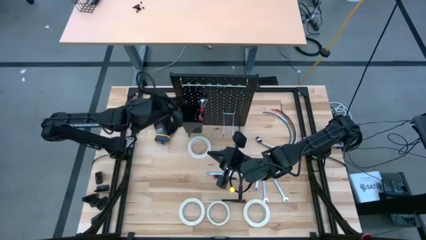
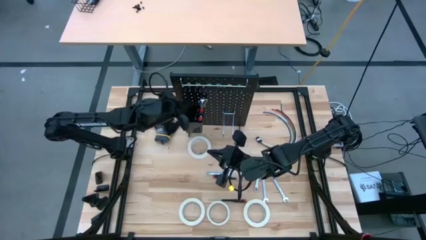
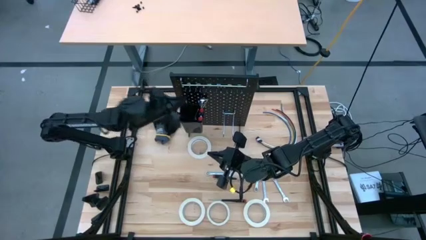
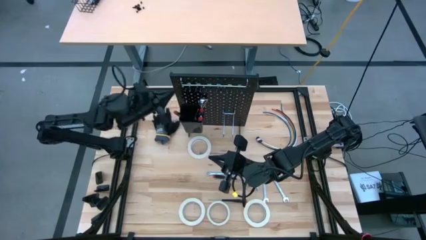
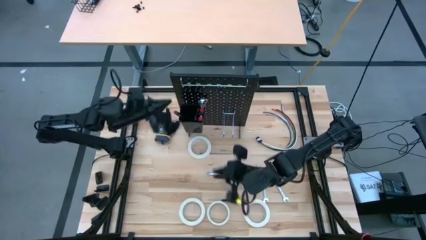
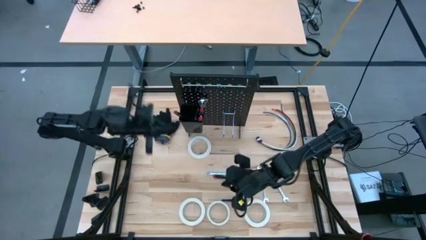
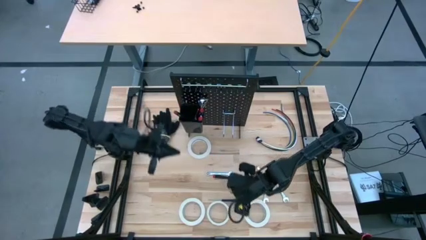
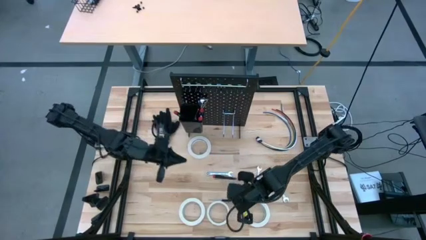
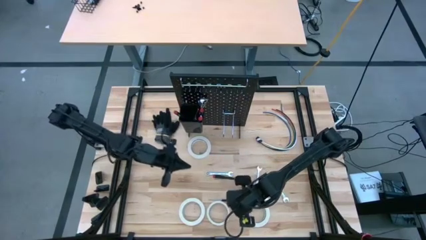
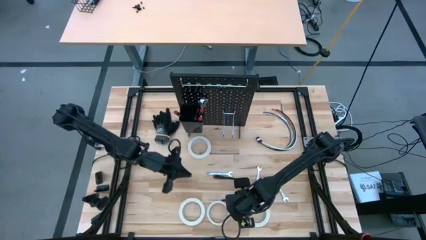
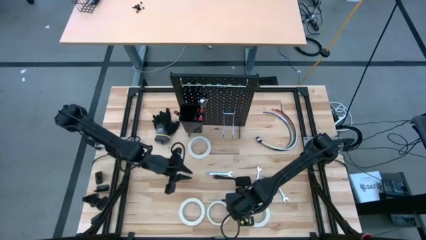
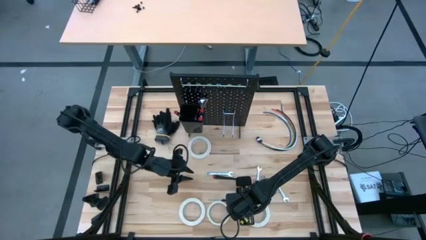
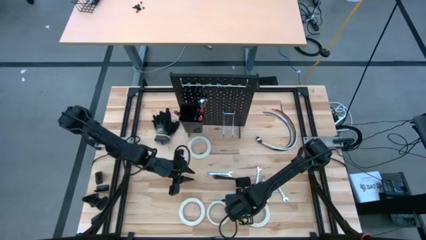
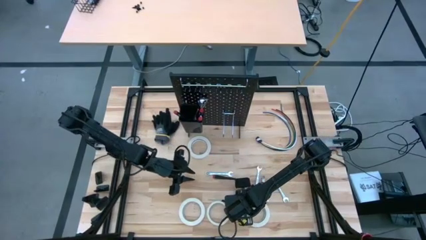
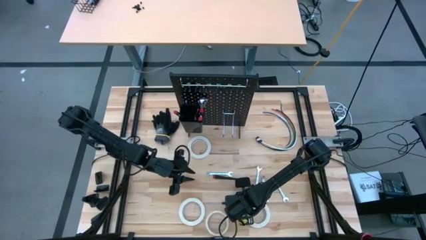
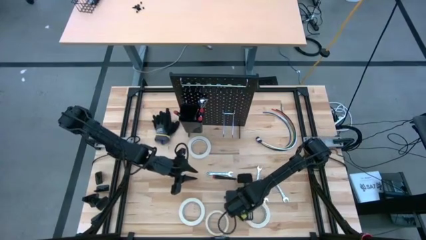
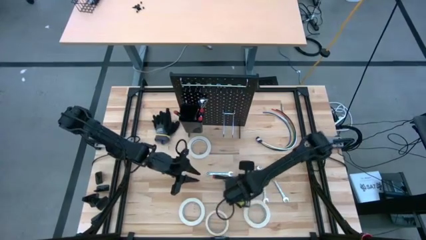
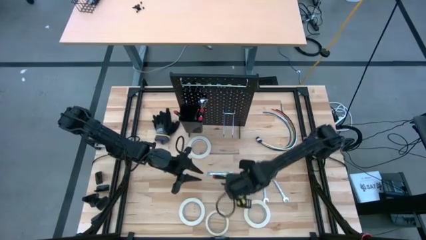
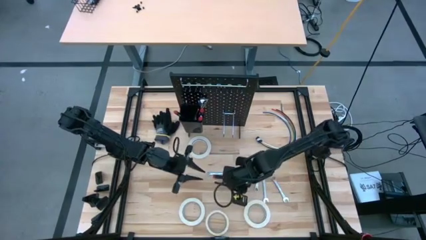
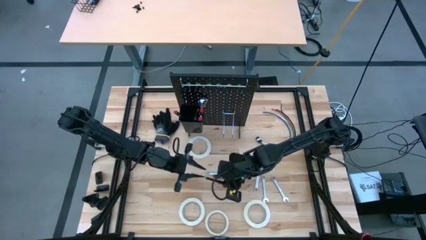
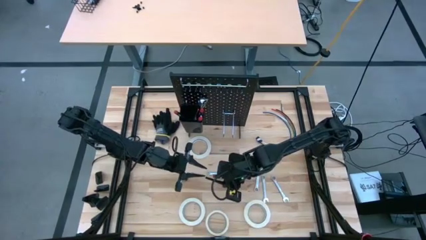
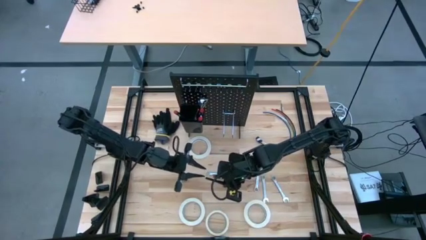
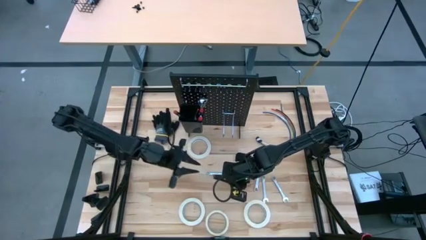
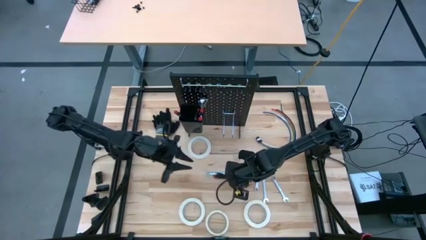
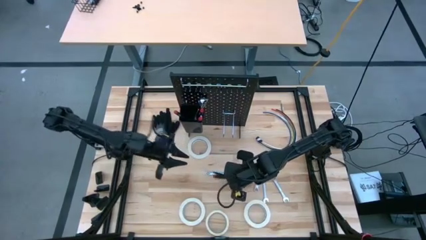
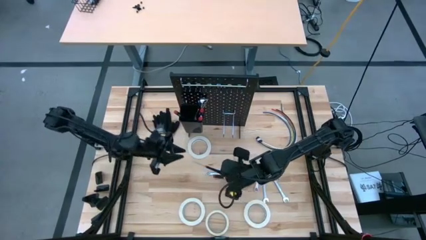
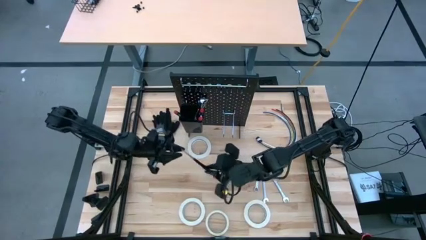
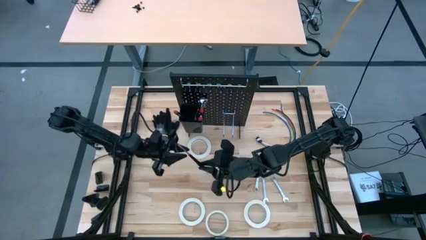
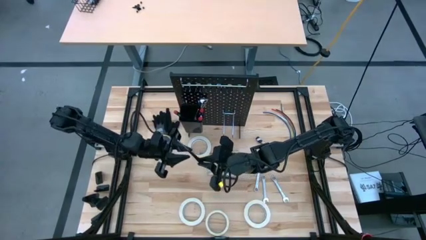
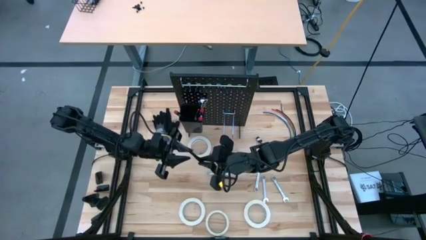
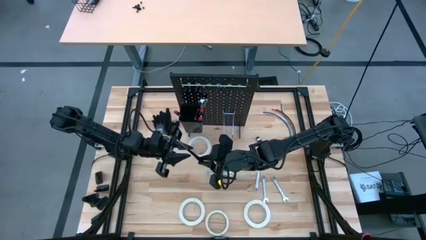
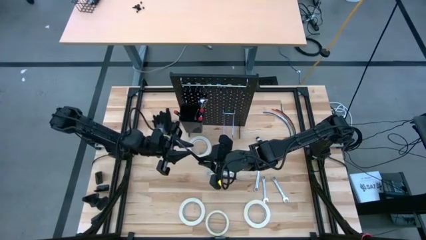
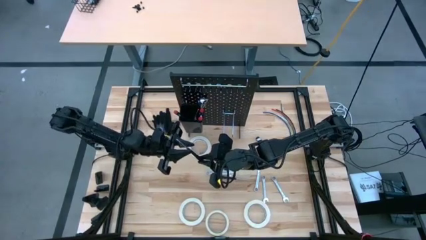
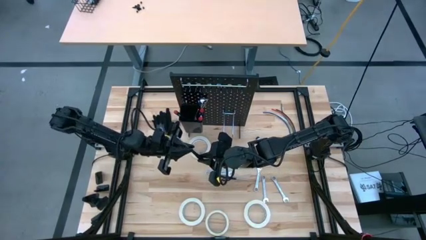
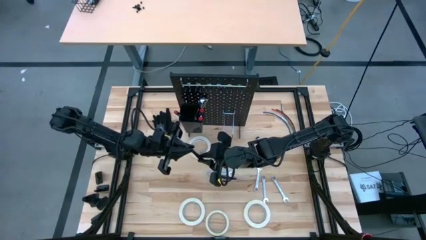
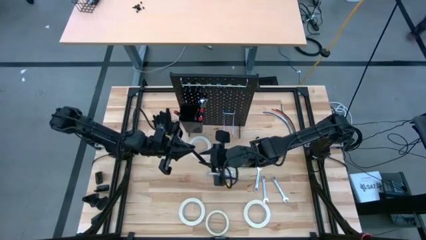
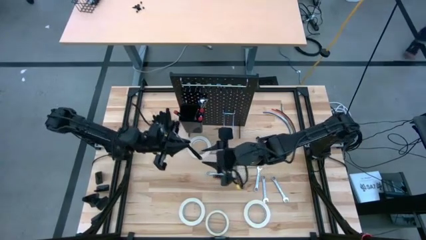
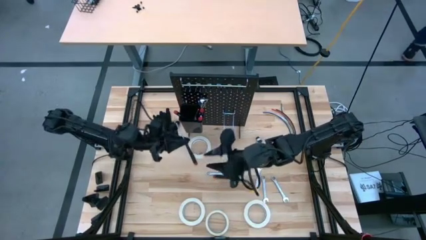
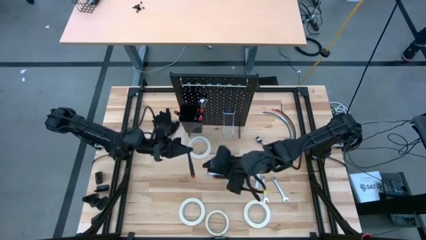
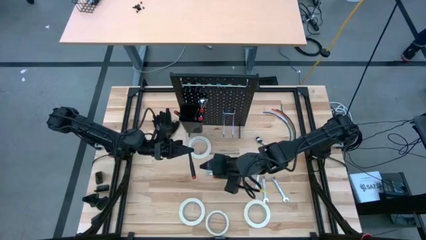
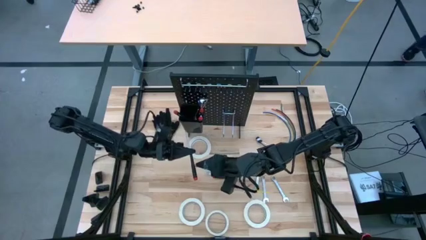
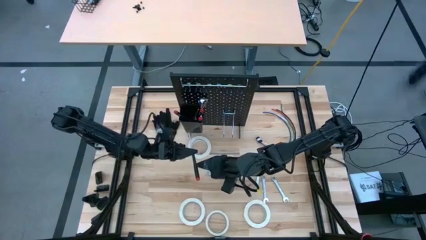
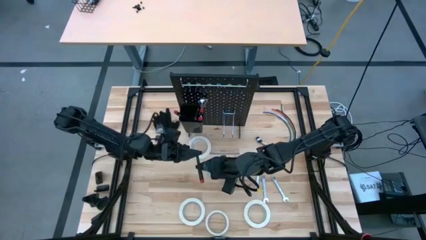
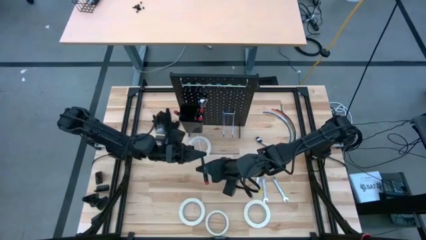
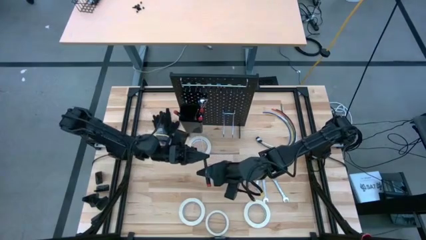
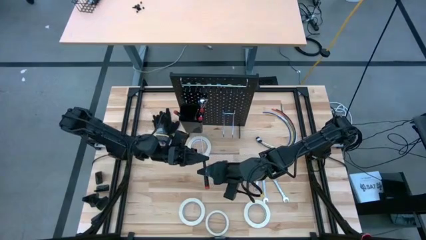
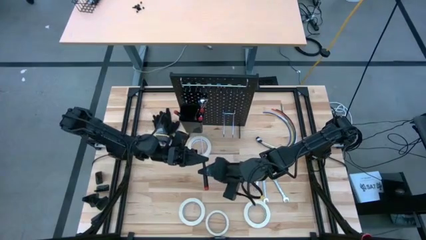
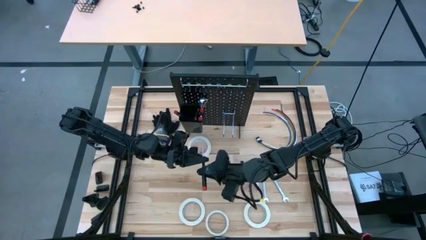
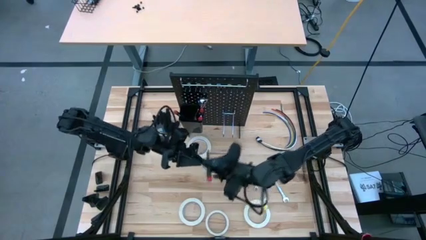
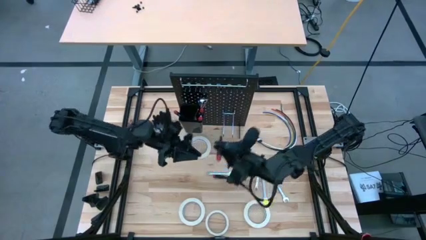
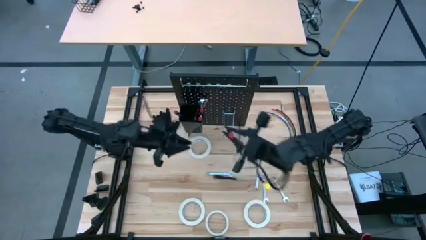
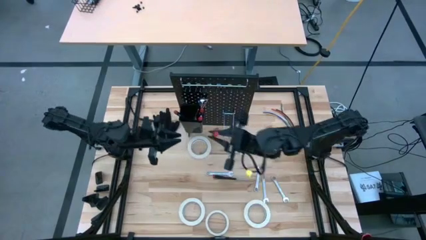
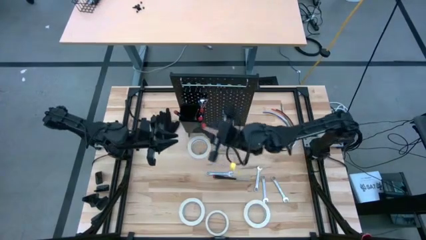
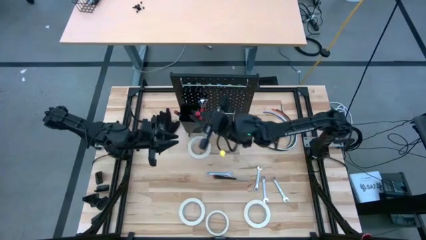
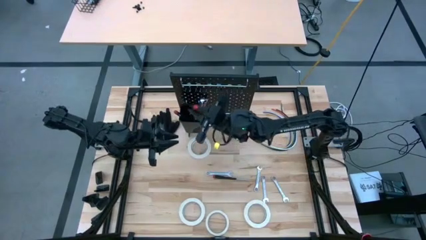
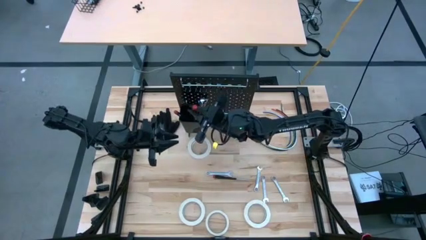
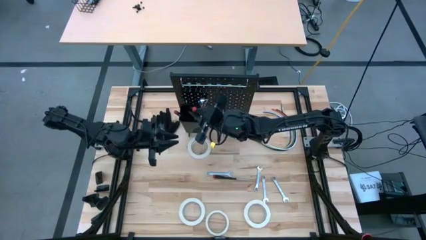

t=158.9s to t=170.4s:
Task: Hang tools onto peg board
Put the black nut driver into the black bin on the peg board

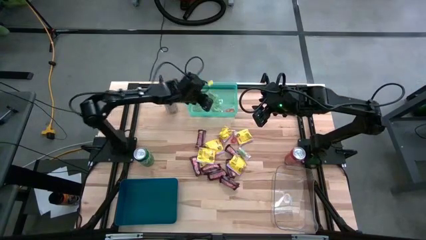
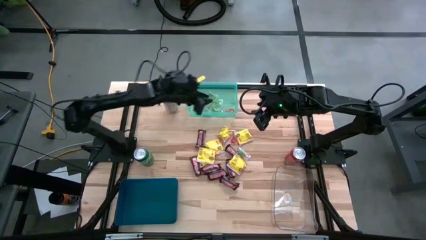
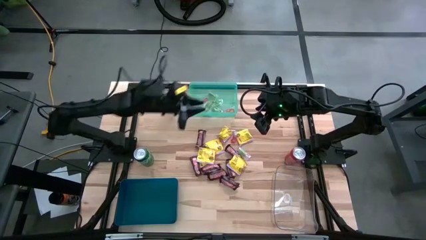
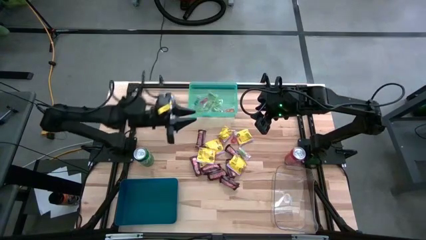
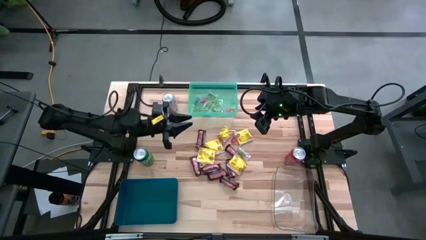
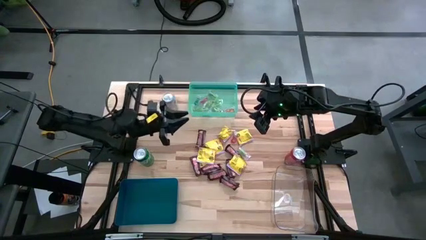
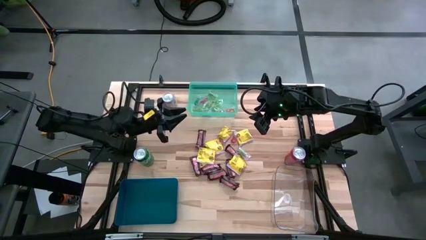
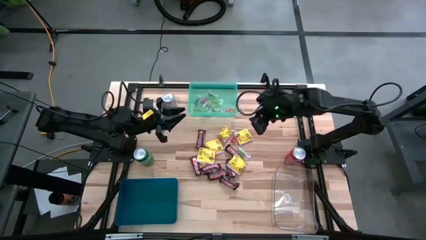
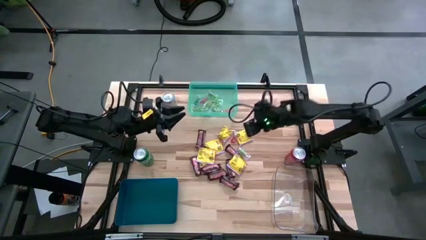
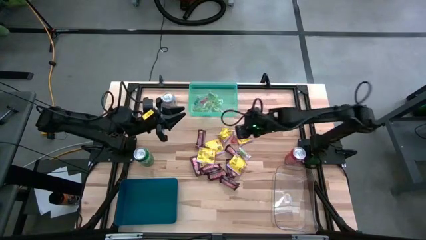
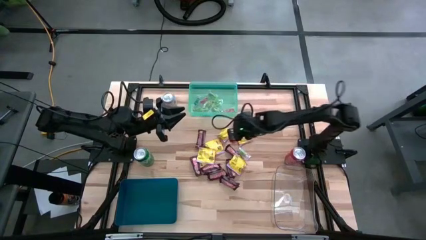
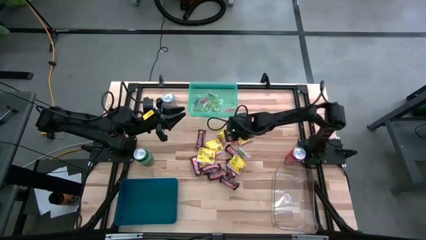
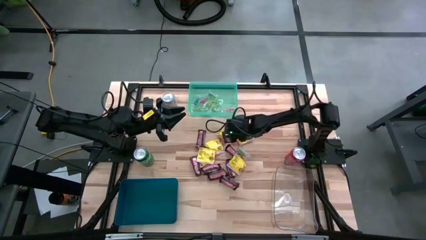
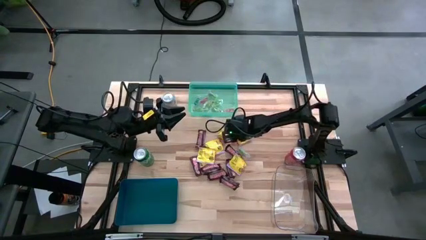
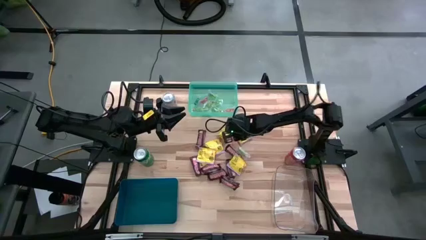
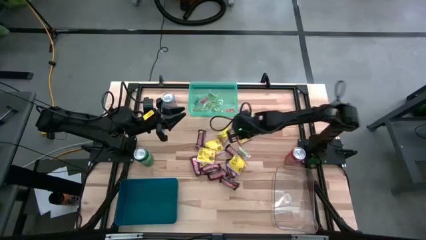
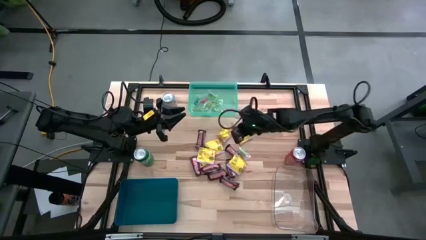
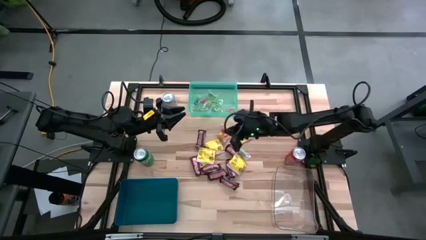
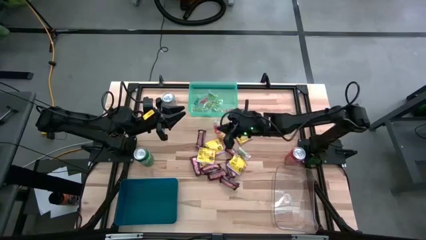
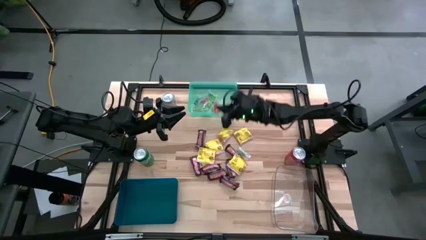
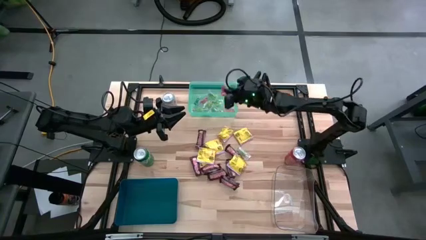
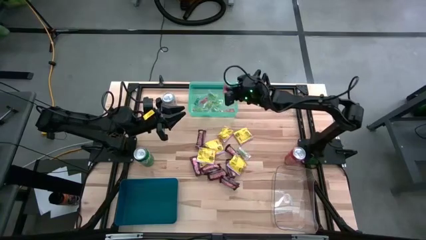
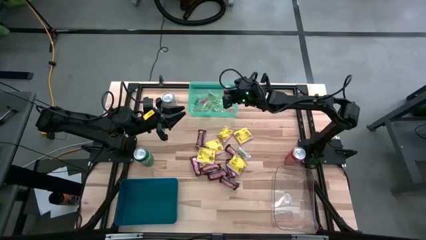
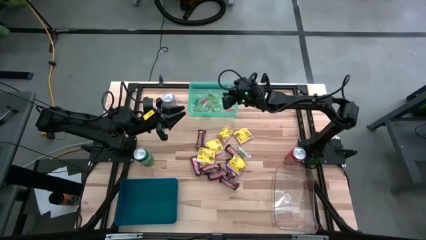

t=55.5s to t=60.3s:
Task: Sort candy
Put the red gummy into the light blue bin
